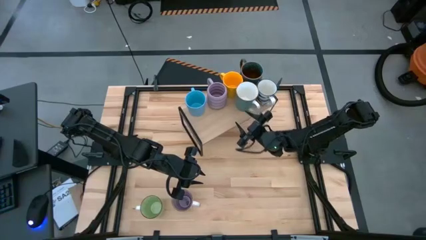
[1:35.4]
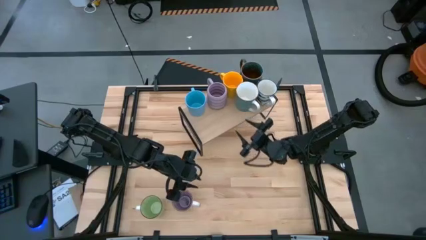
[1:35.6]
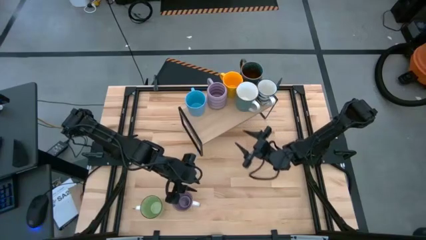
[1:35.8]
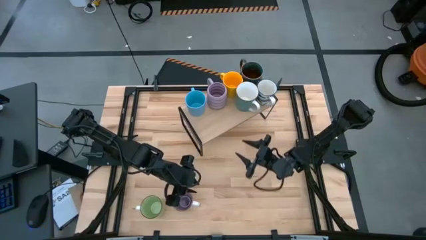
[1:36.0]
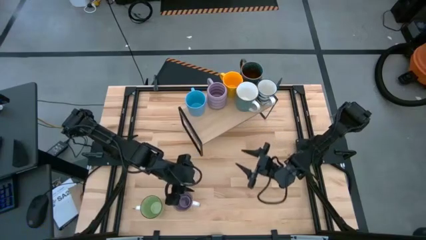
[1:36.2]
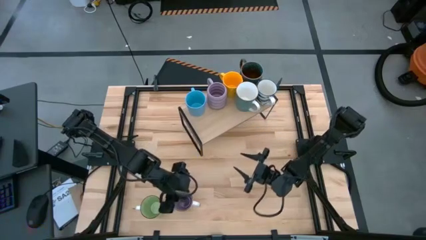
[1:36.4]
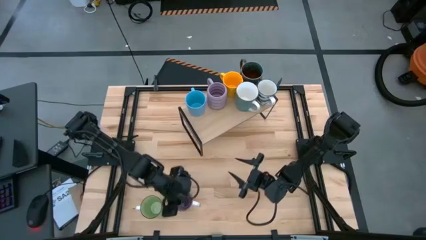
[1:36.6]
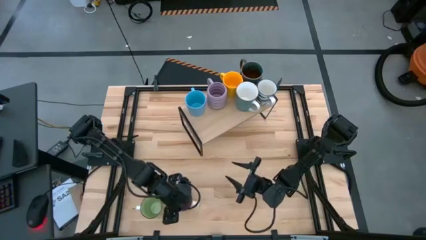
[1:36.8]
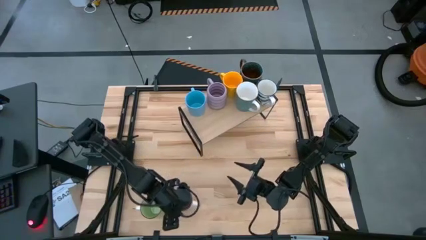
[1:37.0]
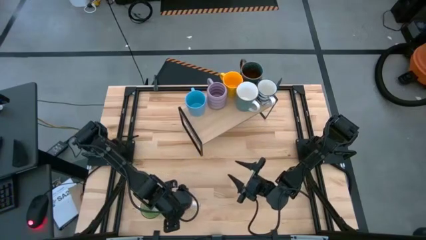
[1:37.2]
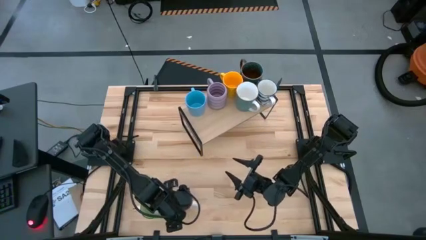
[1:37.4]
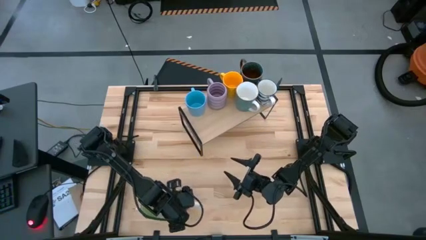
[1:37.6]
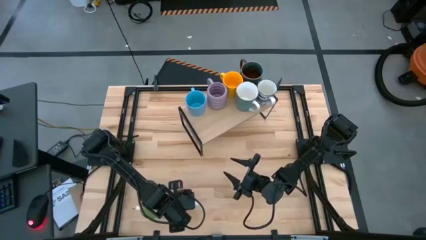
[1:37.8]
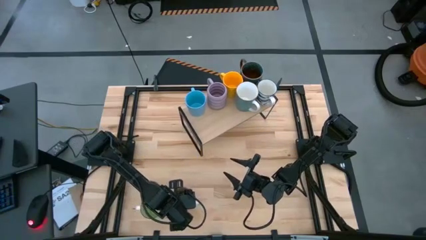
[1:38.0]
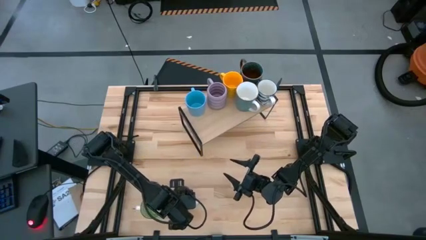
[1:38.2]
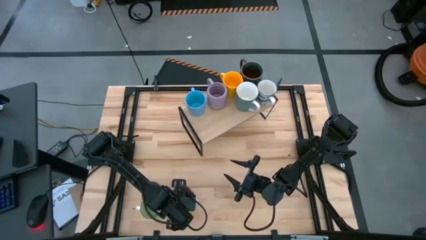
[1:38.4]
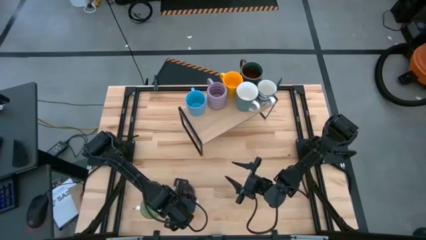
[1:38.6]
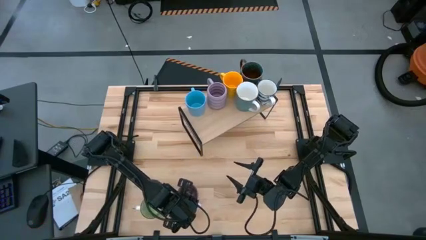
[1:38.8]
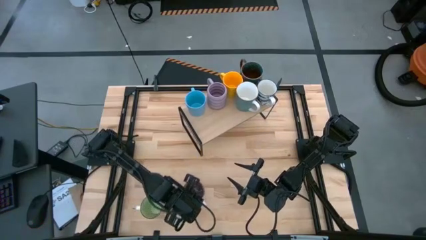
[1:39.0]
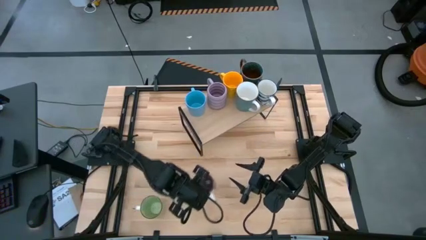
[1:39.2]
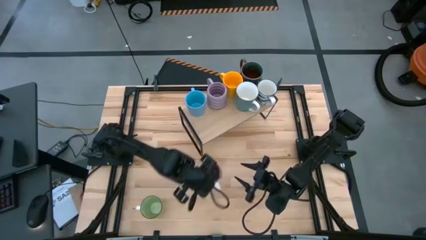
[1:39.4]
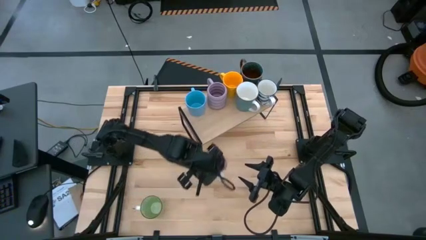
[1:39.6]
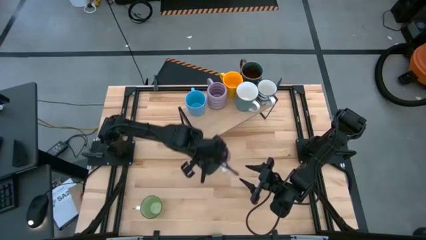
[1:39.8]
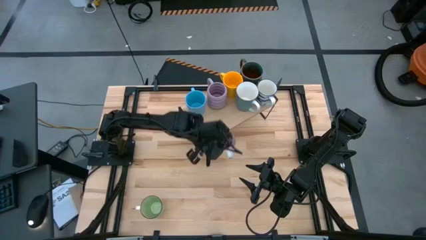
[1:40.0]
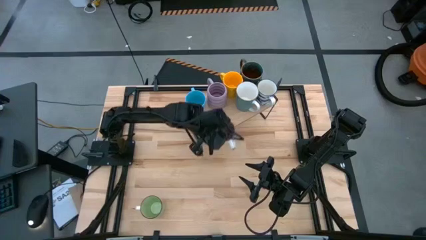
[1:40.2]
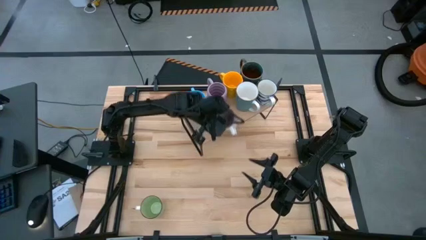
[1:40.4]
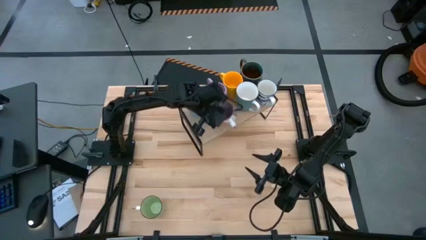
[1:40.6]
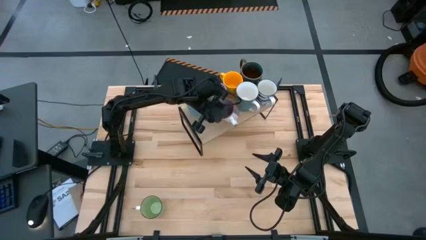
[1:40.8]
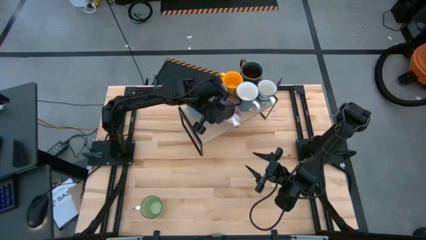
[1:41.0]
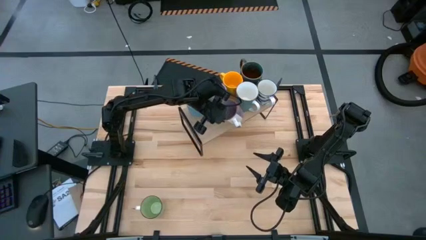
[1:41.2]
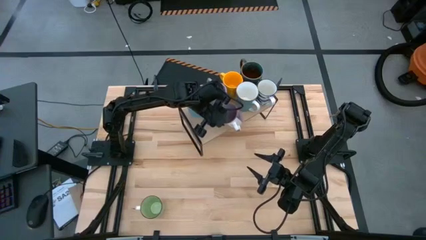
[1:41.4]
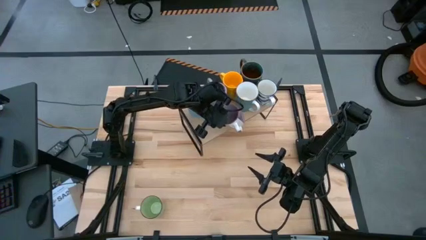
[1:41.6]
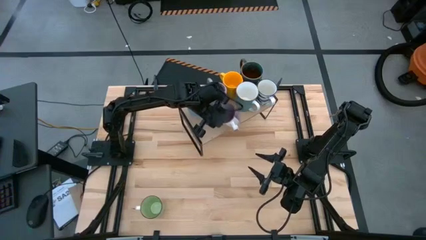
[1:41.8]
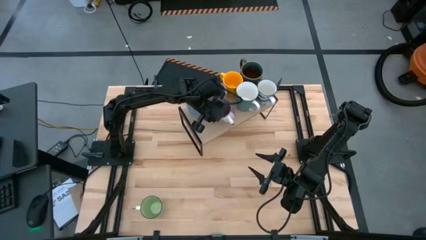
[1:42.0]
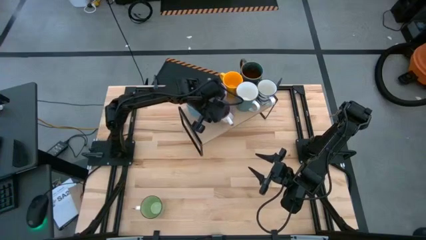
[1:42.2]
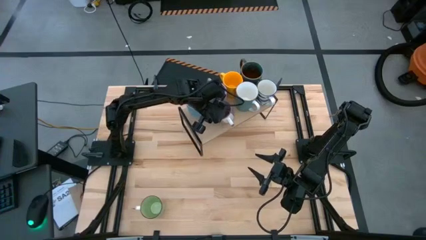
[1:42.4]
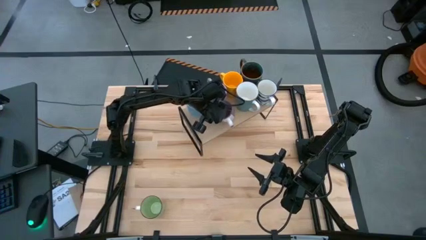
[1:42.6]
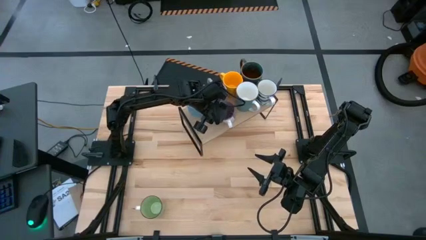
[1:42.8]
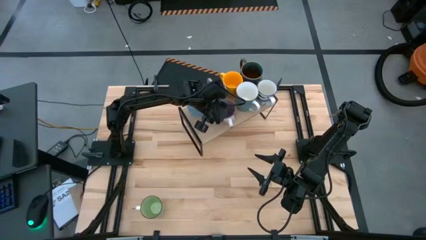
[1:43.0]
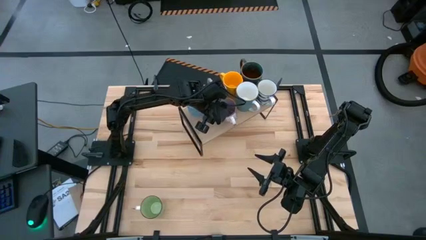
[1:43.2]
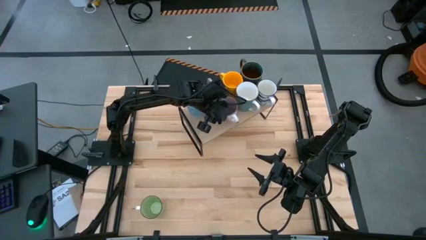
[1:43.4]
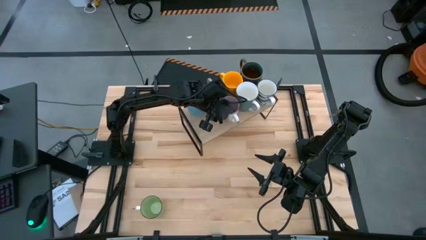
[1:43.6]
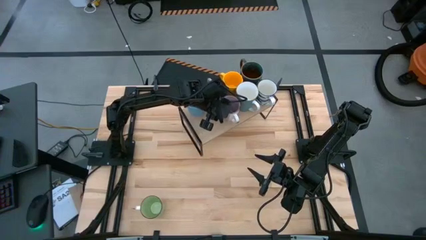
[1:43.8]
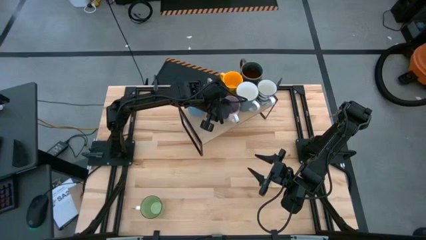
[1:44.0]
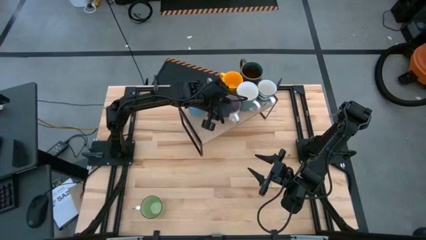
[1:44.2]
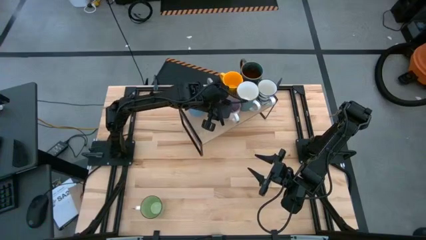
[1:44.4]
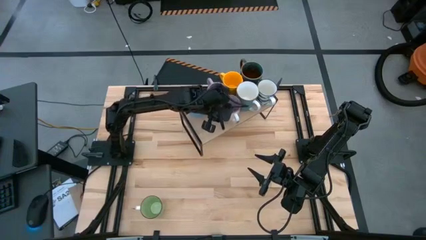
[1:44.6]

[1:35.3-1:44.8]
Task: Place coffee mugs
Put the purple/white cup on the shelf

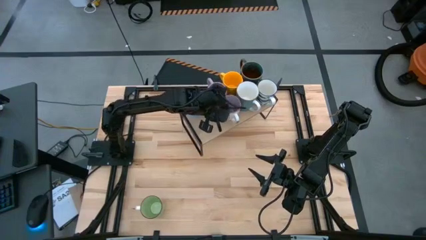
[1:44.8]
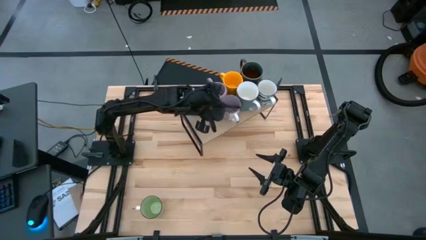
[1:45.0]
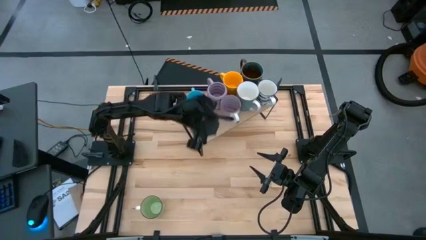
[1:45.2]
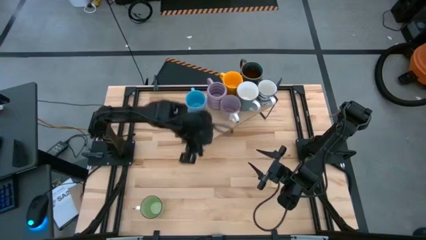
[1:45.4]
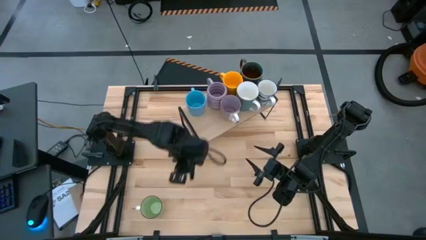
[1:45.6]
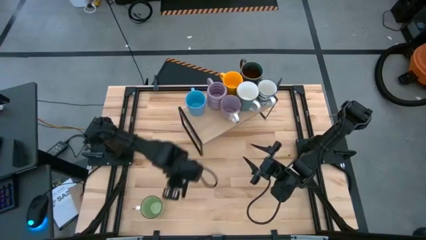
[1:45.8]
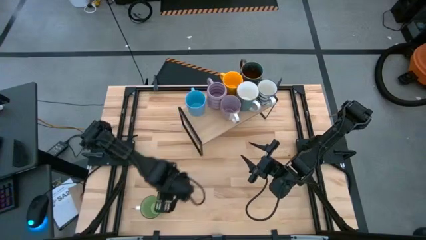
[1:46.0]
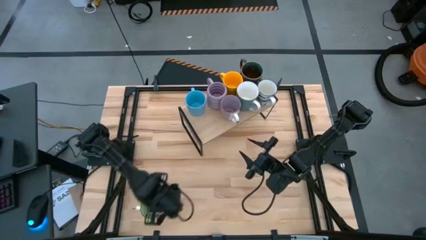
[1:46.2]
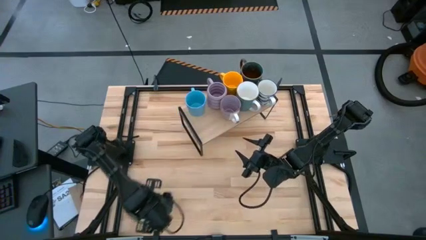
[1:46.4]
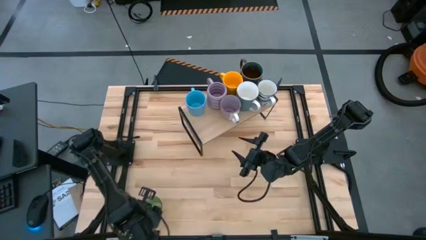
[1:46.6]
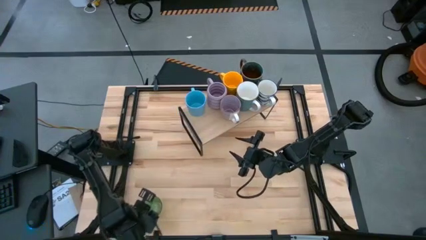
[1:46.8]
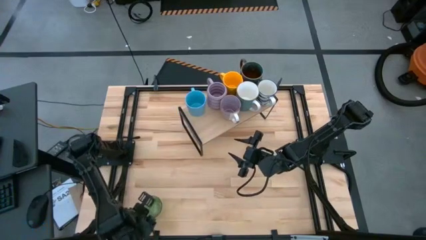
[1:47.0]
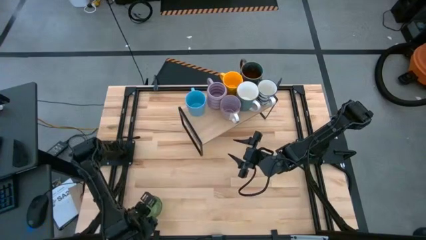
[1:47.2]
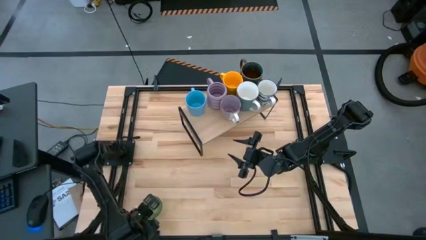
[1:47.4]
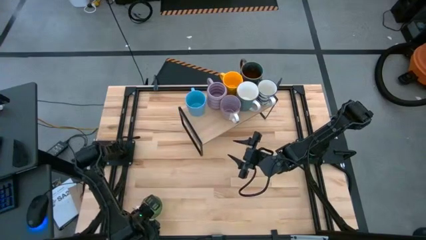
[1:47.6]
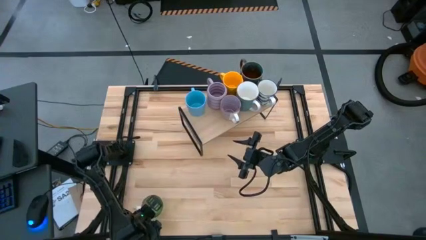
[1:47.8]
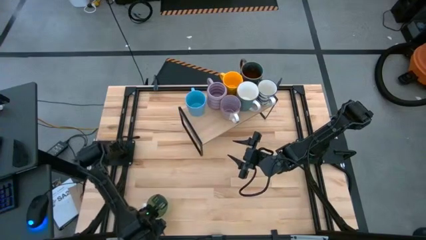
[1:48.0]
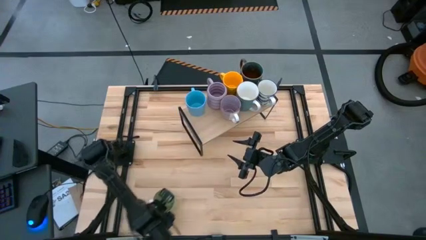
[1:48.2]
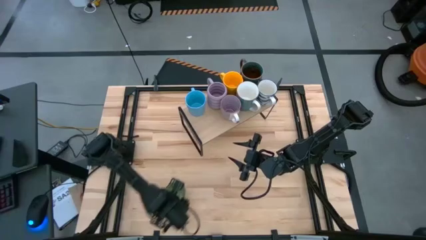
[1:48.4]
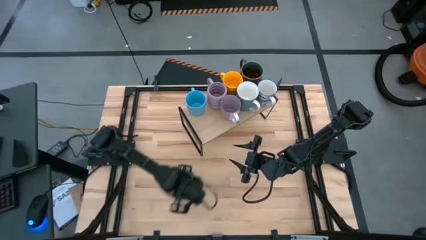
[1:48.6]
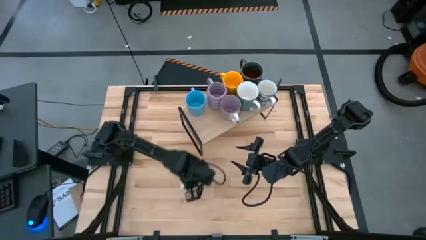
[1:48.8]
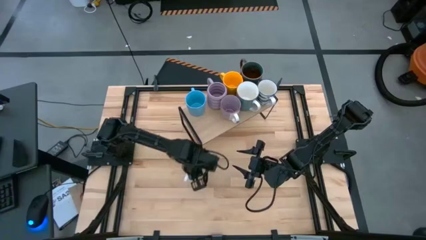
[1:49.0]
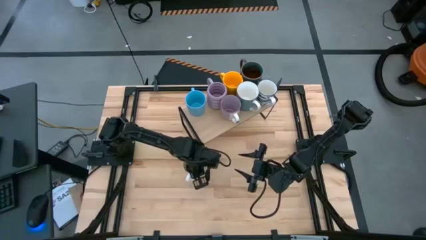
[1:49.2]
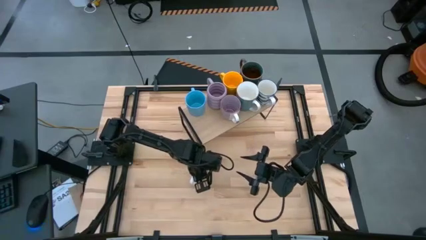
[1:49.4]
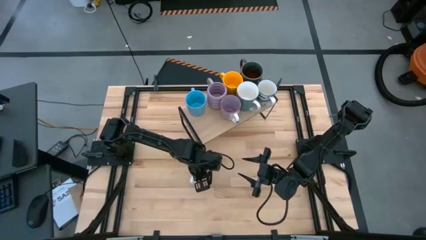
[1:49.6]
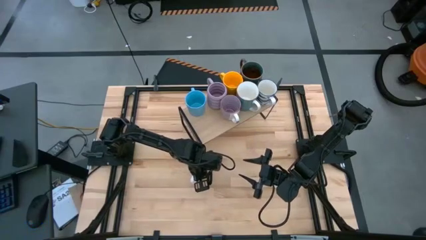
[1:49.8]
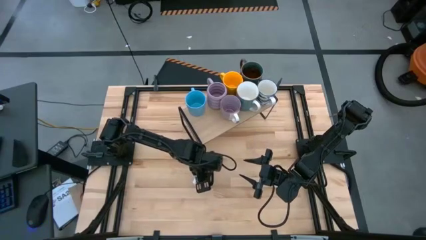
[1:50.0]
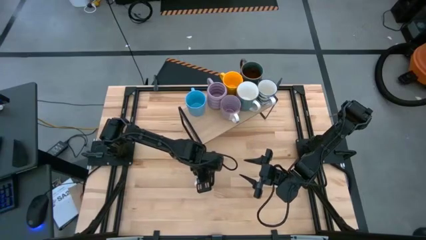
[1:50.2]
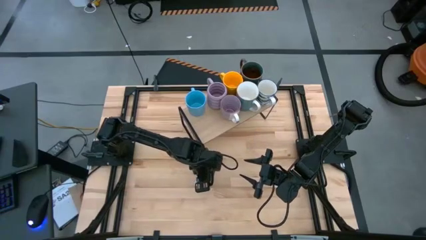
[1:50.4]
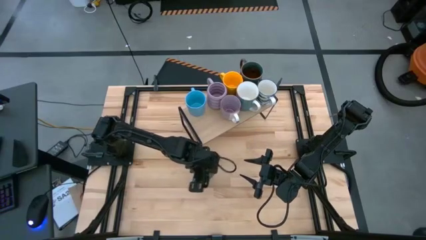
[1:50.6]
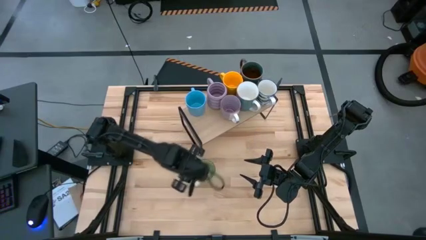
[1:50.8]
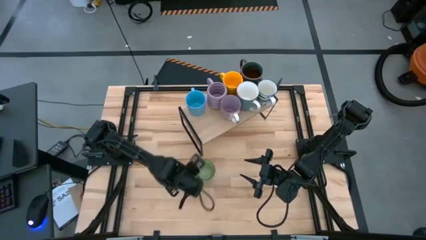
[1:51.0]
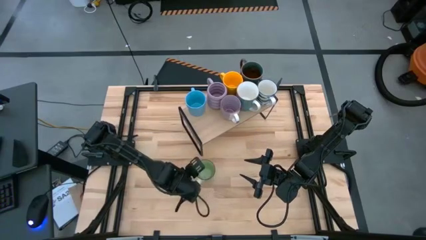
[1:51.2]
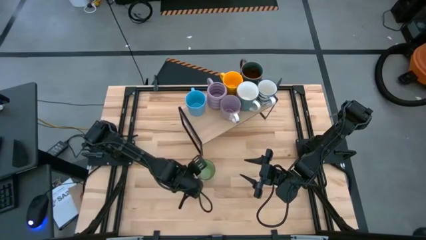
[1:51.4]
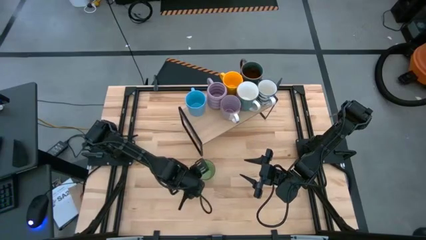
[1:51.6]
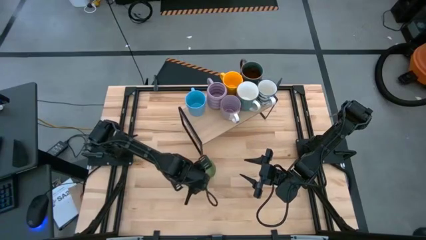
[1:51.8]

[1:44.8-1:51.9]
Put the green mug on the shelf
